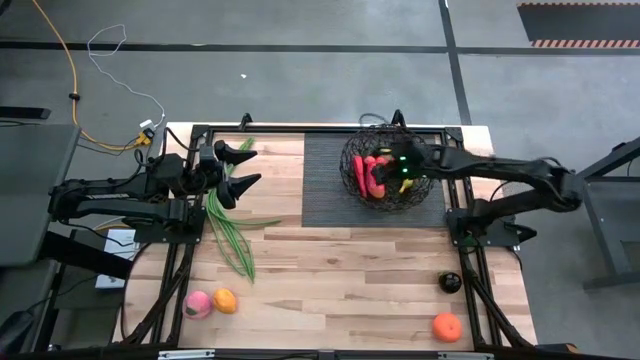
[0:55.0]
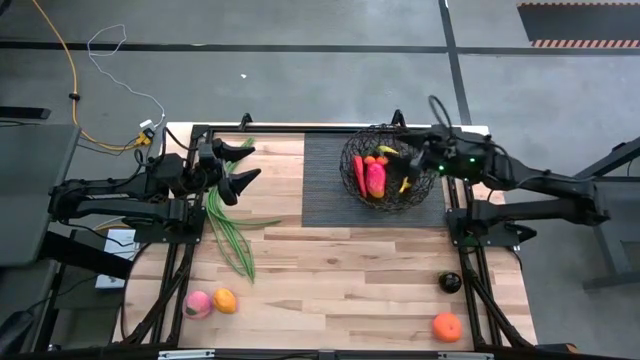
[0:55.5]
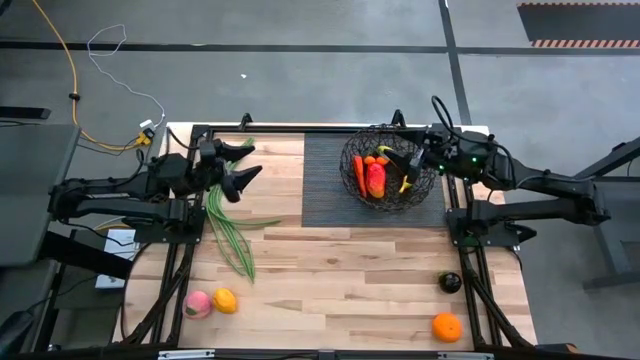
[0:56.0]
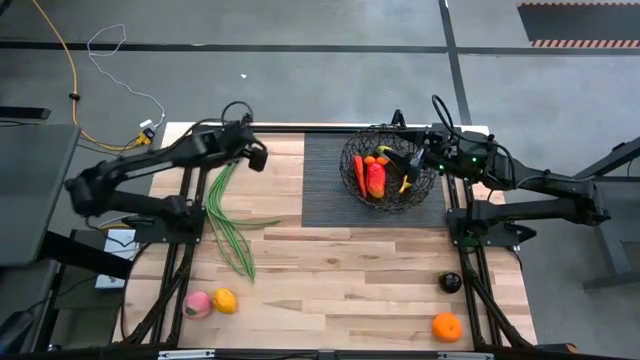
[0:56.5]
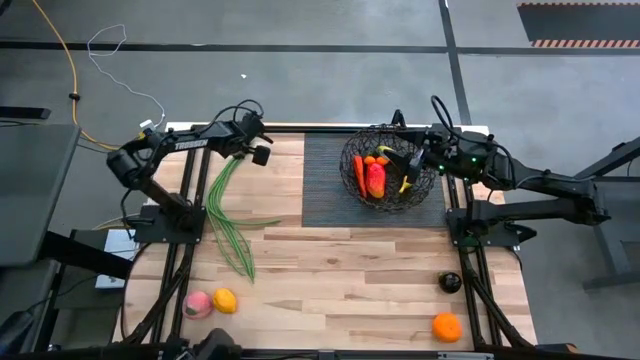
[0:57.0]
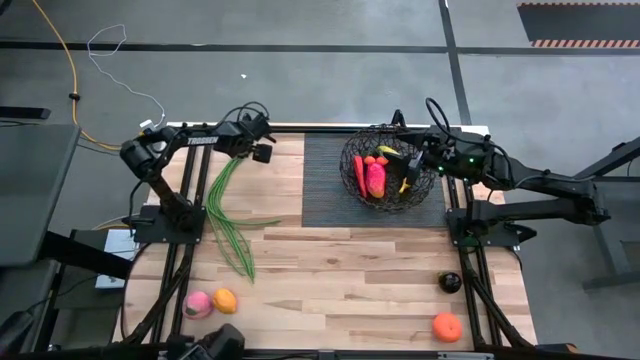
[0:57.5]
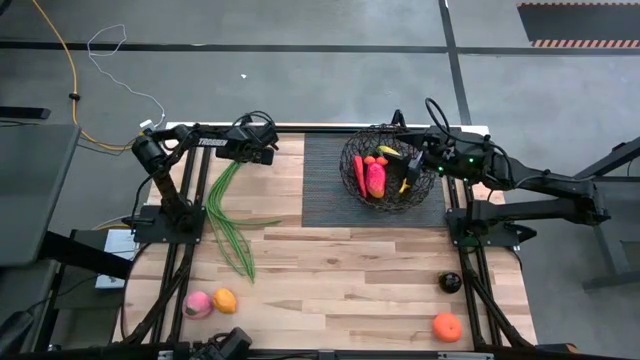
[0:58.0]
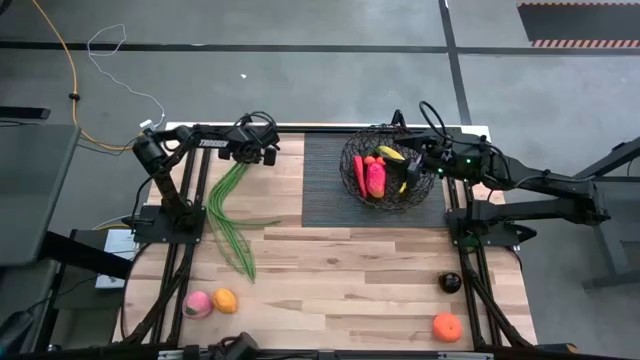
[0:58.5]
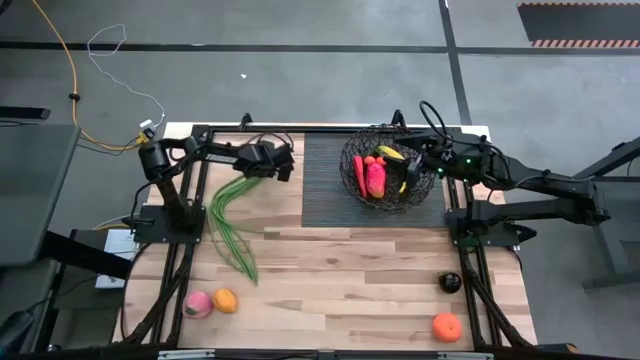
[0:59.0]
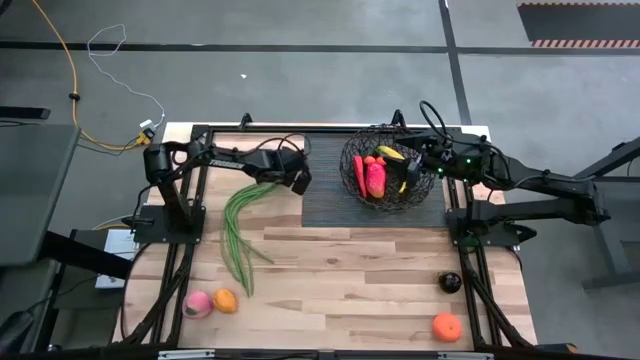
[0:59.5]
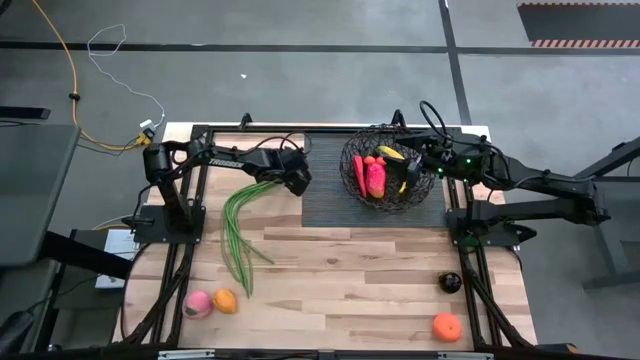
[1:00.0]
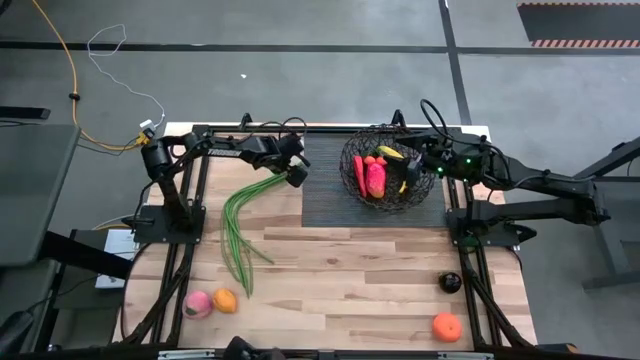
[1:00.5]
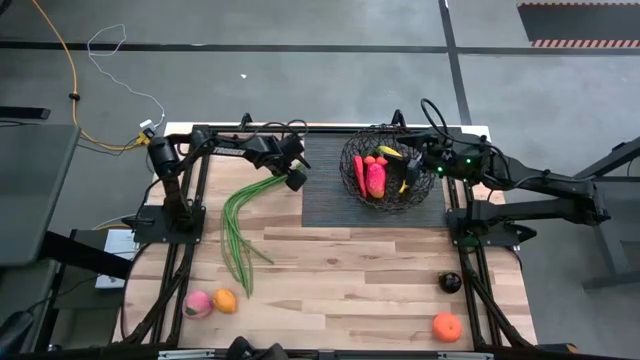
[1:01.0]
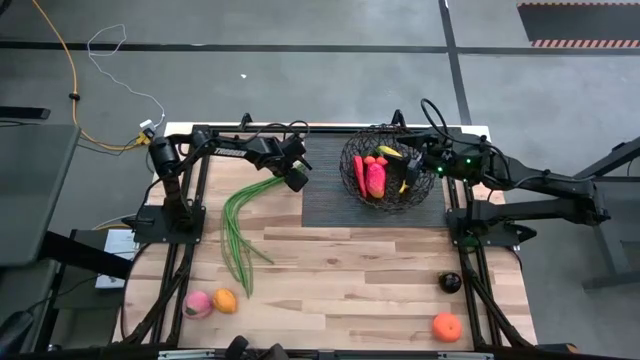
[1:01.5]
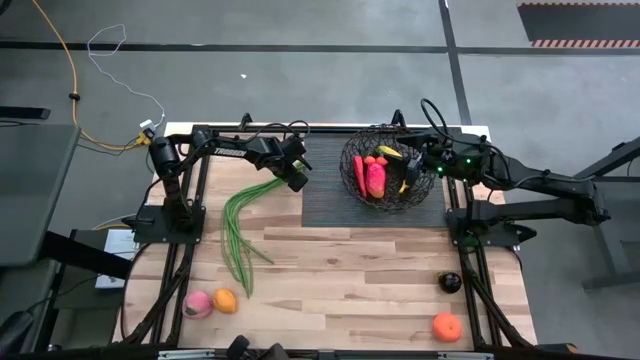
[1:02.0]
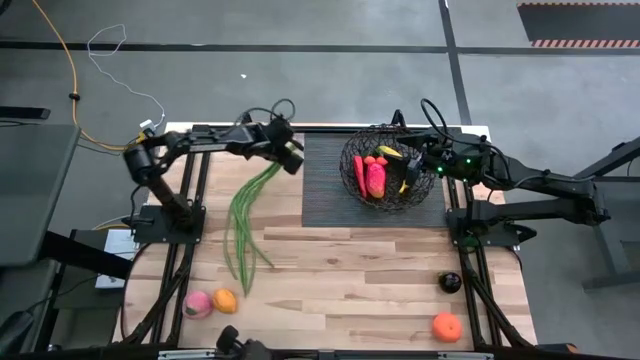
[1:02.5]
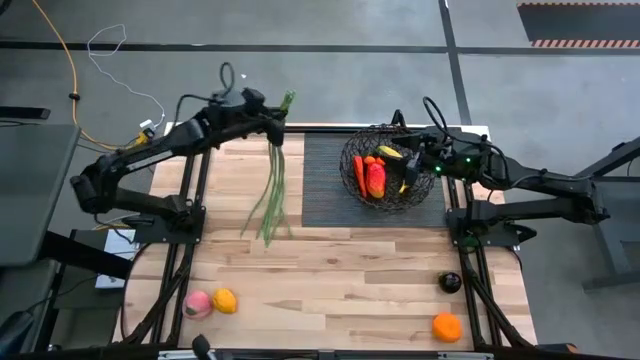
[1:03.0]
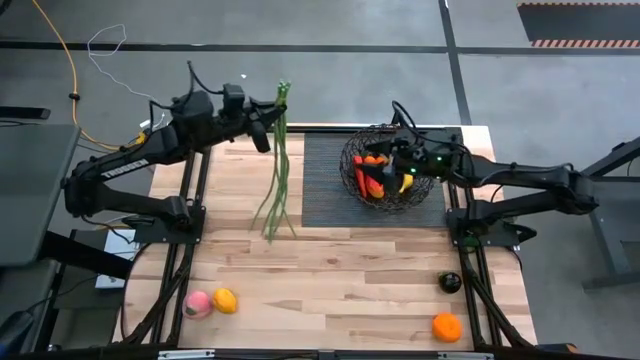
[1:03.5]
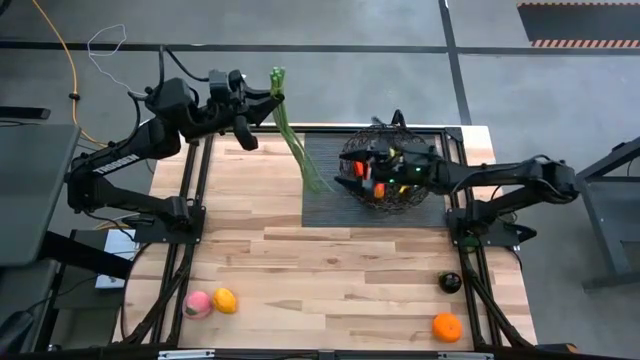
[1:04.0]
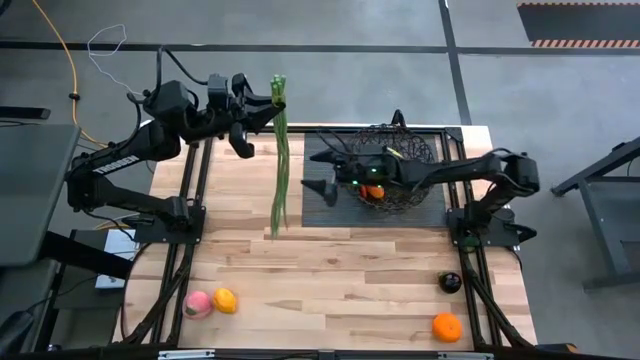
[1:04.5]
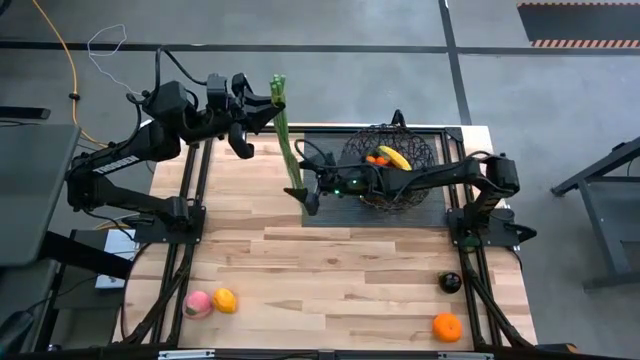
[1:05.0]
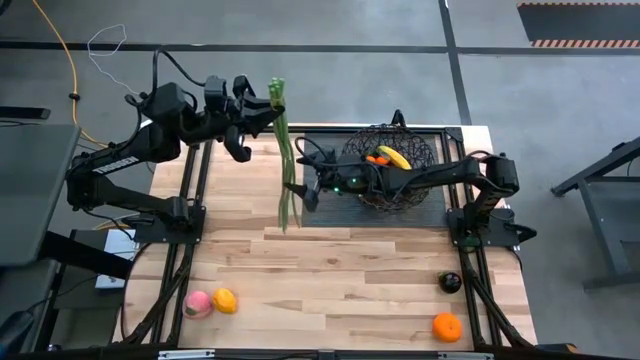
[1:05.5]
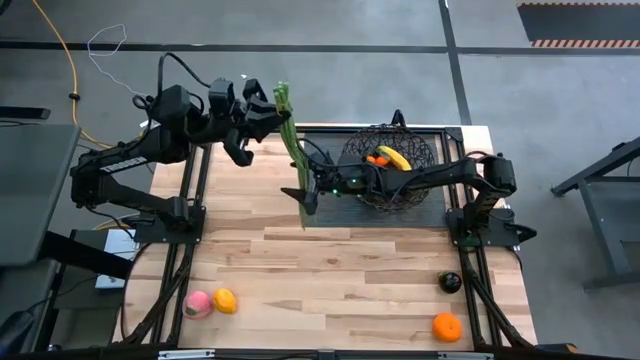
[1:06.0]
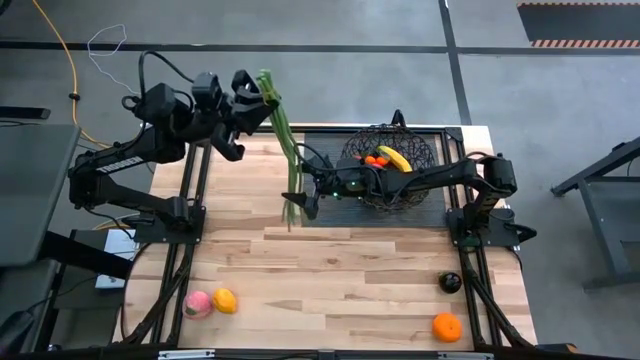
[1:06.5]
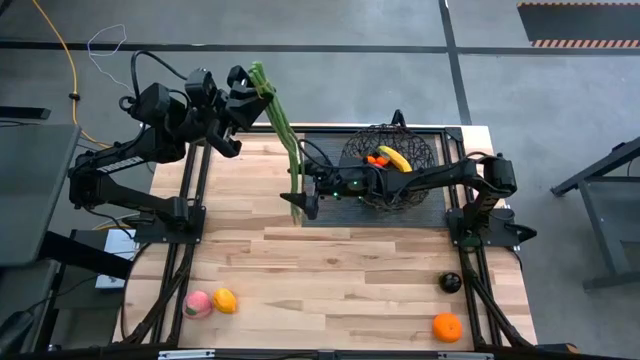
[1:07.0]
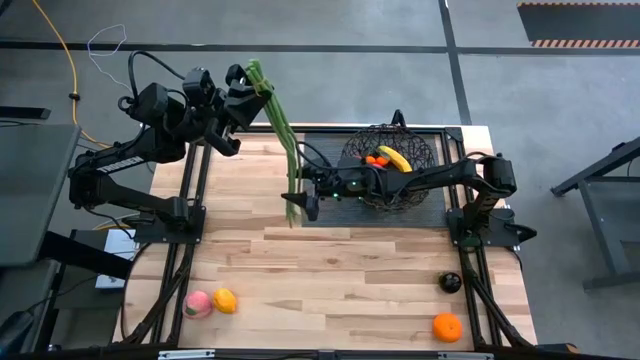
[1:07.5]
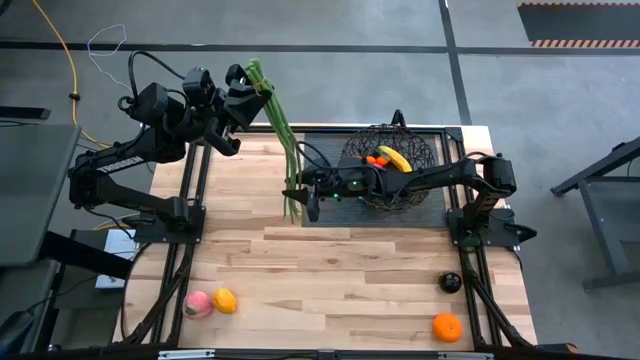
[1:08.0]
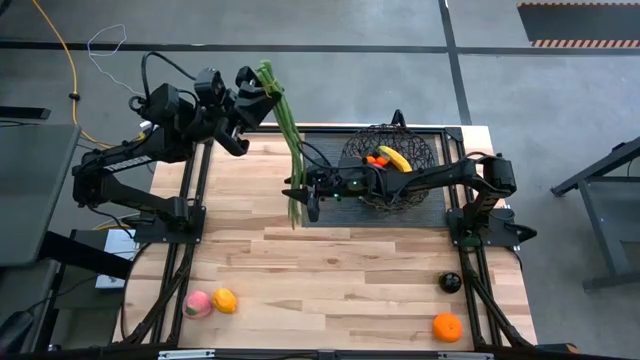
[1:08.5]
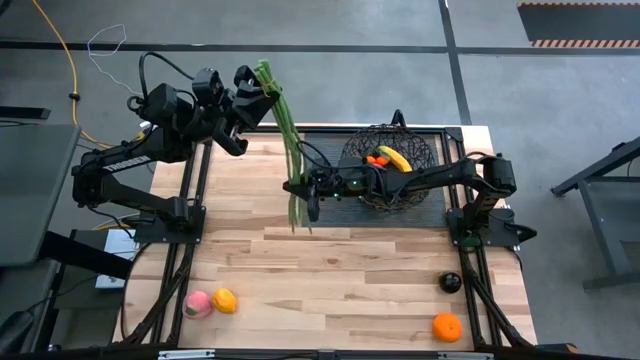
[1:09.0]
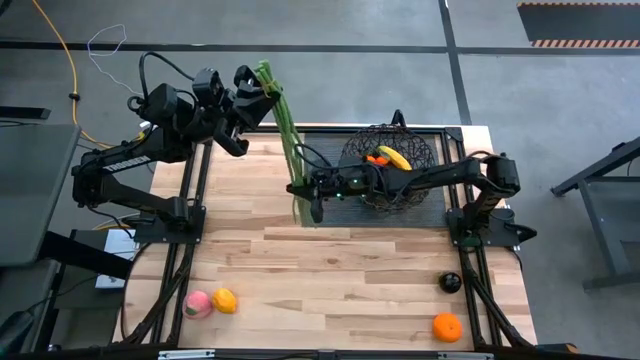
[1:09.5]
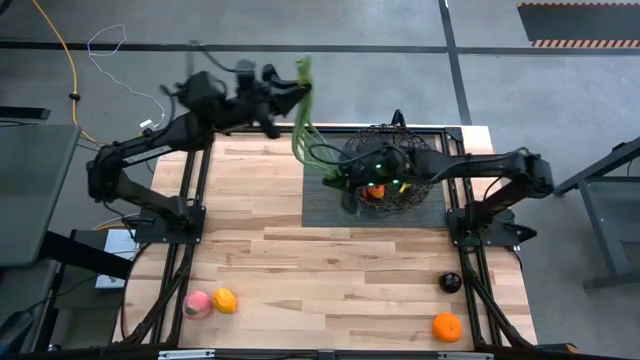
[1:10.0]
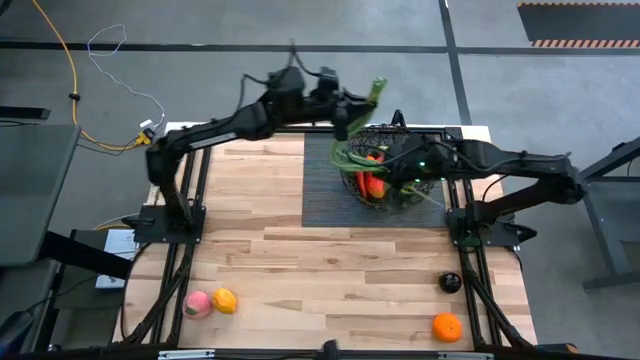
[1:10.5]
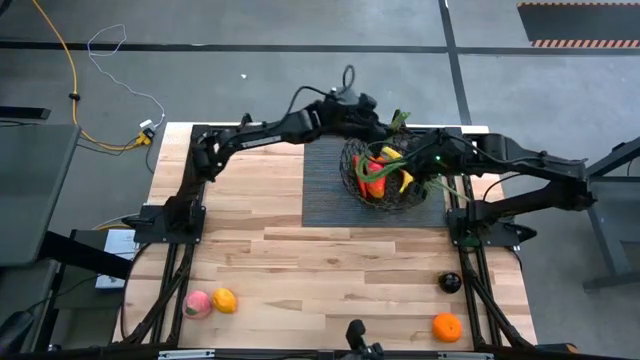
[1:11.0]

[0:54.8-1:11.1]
Task: Build produce basket
Put the green beans into the black basket
